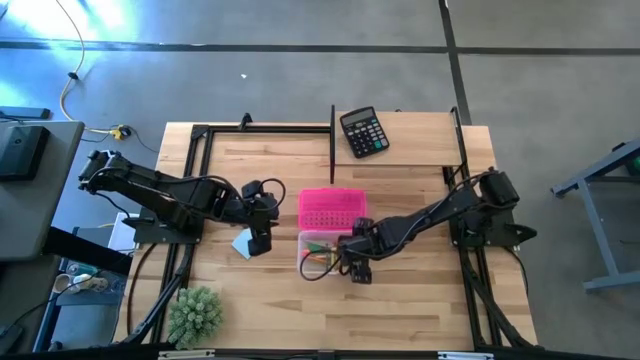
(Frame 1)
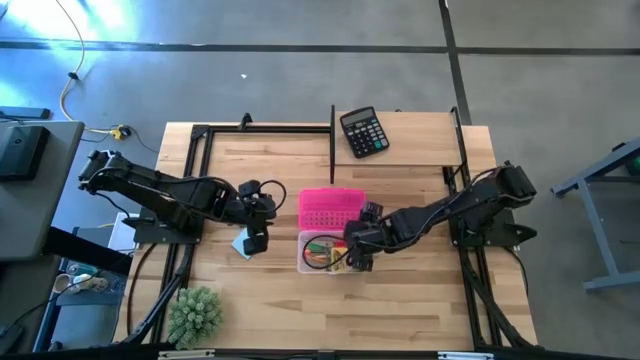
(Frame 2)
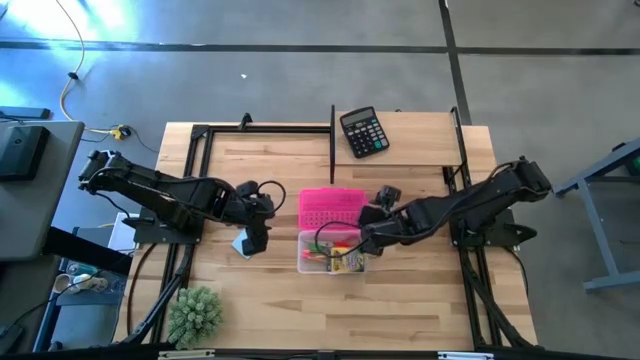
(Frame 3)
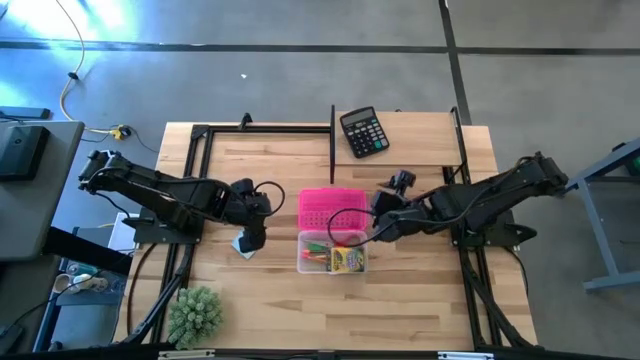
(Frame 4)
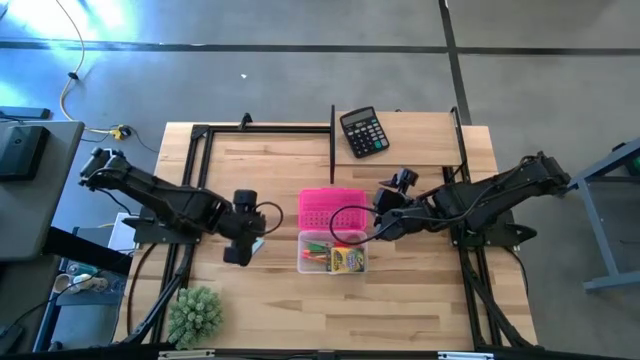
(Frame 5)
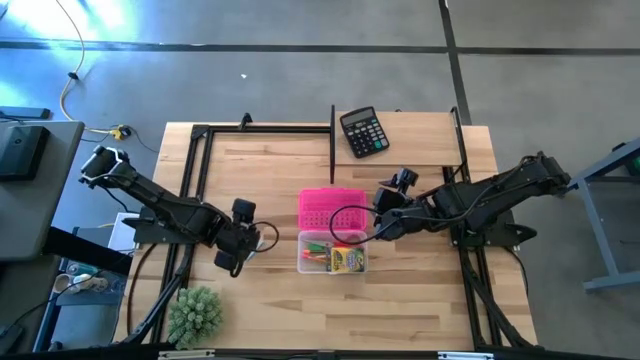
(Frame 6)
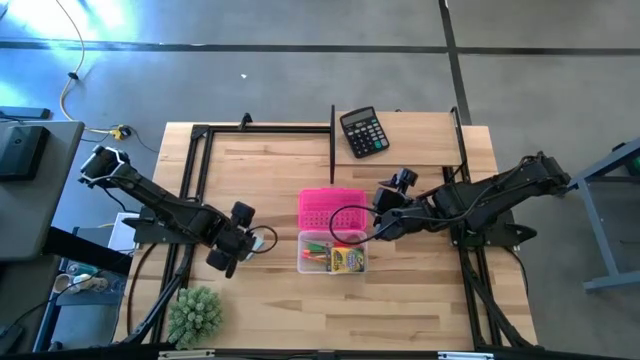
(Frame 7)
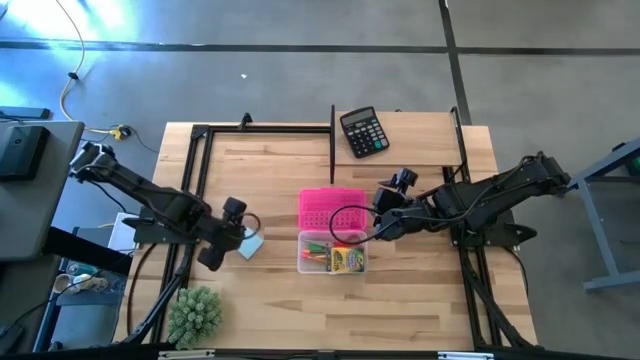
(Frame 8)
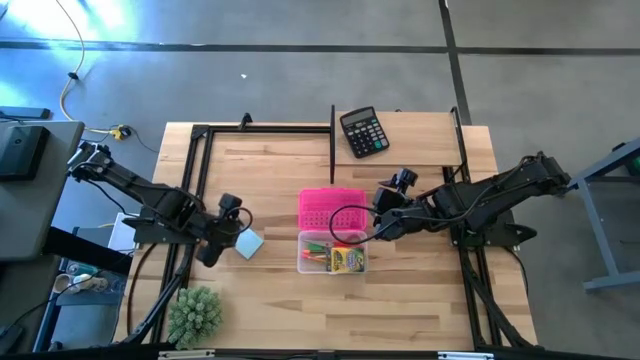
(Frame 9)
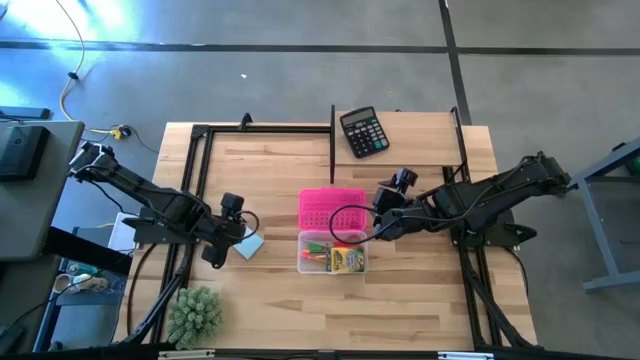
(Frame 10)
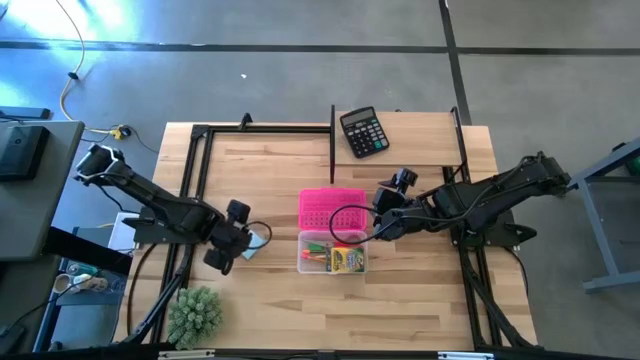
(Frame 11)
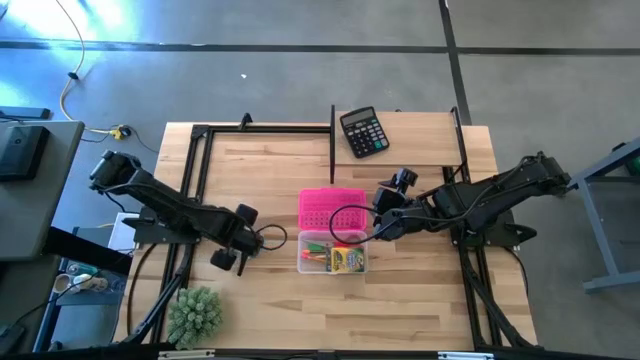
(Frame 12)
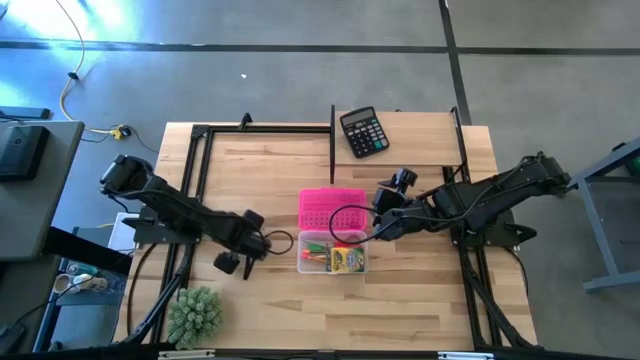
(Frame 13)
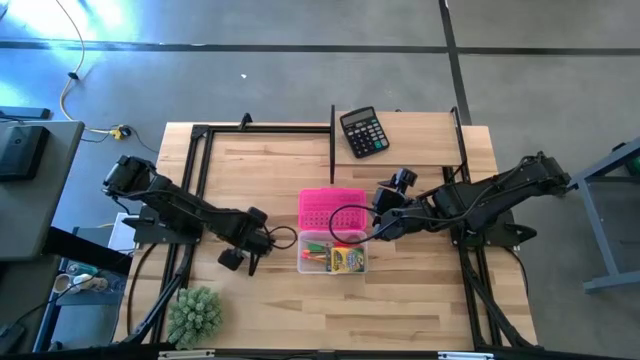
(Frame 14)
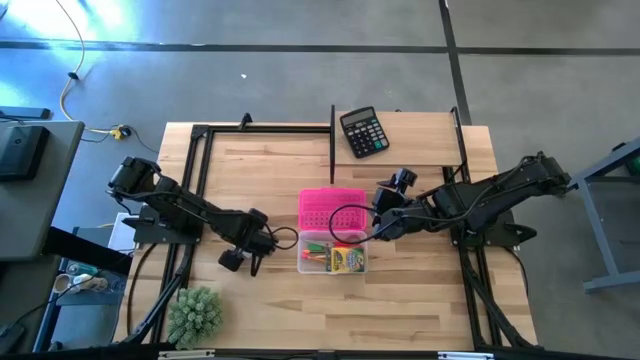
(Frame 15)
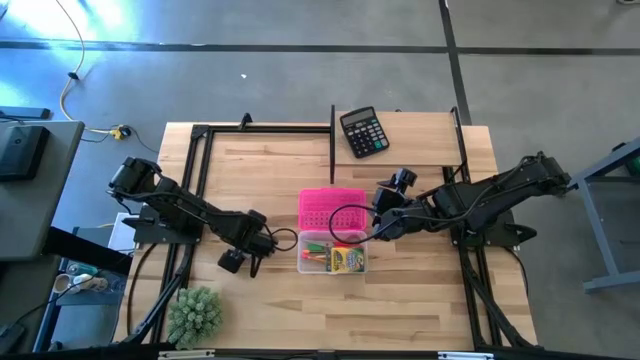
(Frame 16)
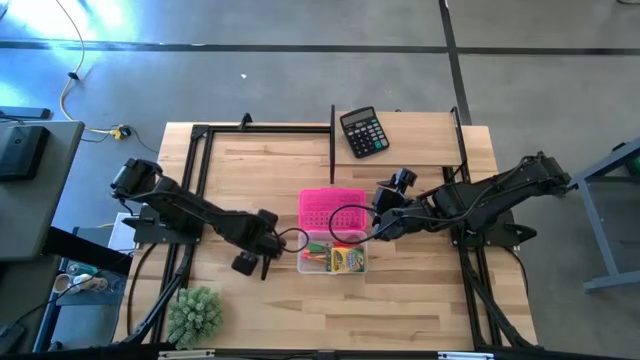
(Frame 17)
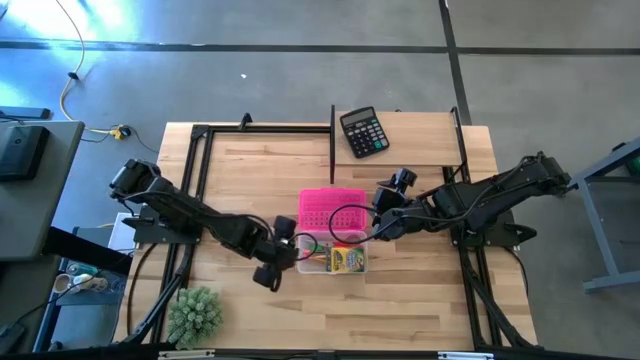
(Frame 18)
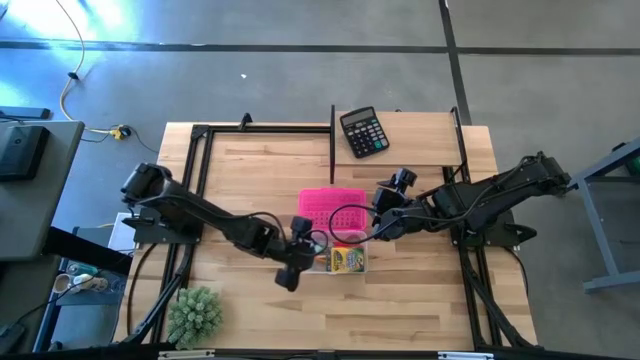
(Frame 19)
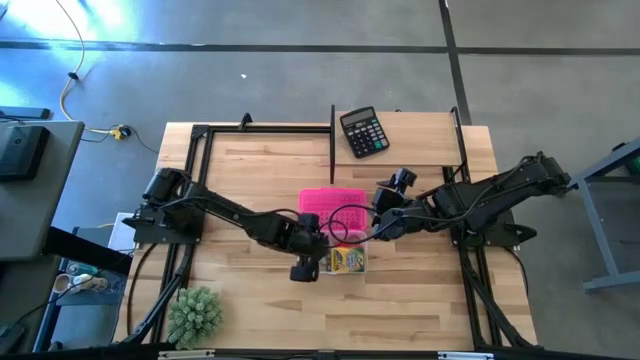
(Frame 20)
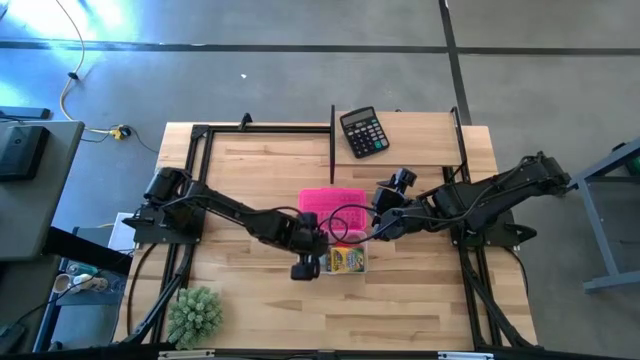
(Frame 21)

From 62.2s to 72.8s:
Task: Pack school essentials
Put the light blue sticky notes into the pink supply box

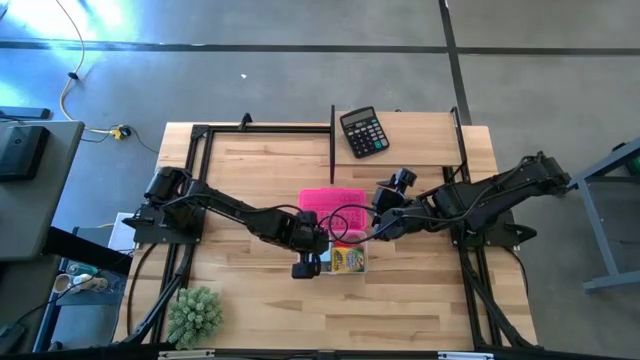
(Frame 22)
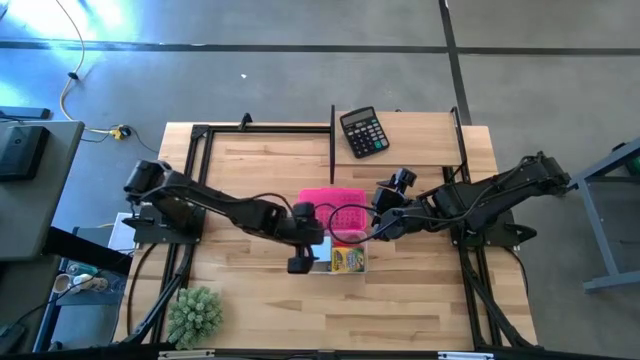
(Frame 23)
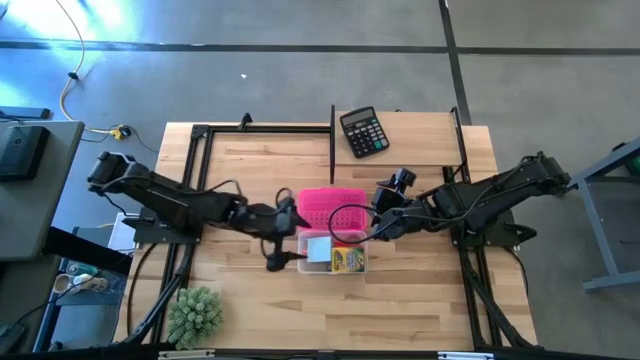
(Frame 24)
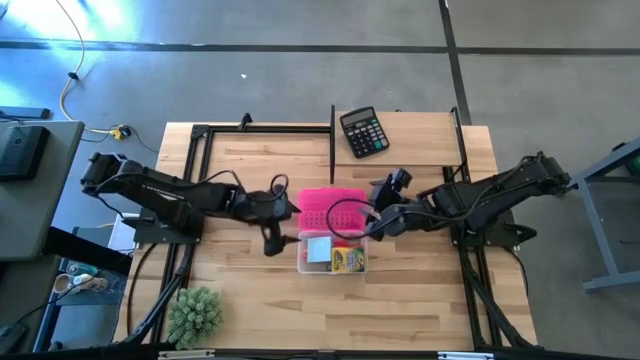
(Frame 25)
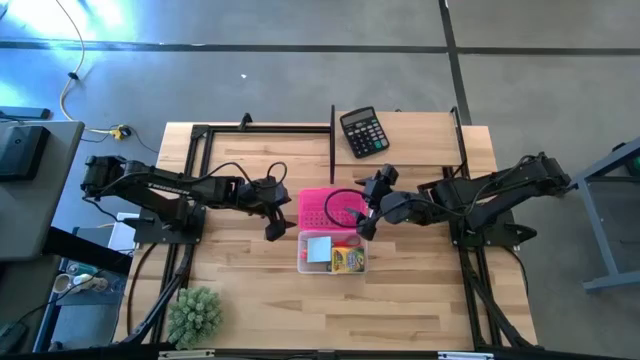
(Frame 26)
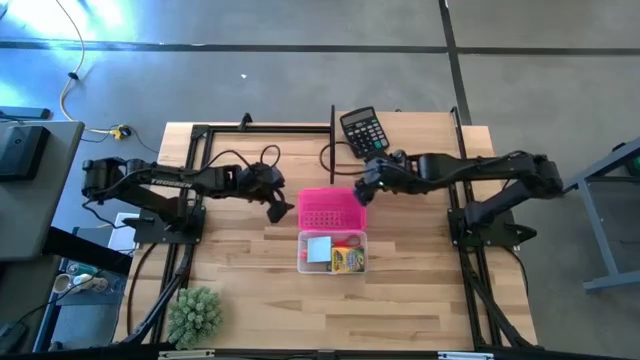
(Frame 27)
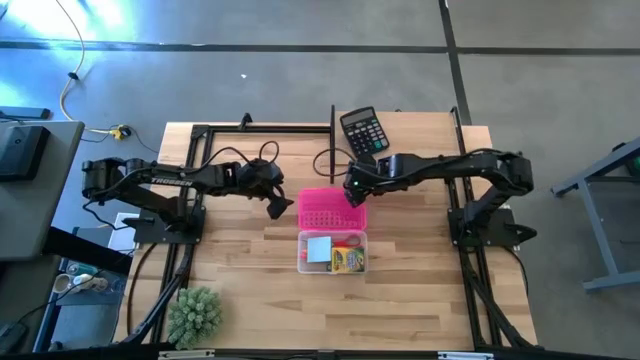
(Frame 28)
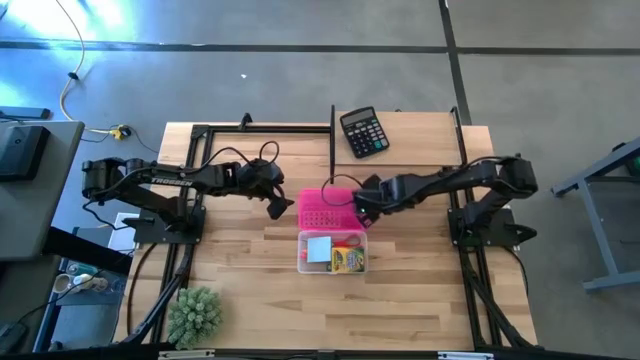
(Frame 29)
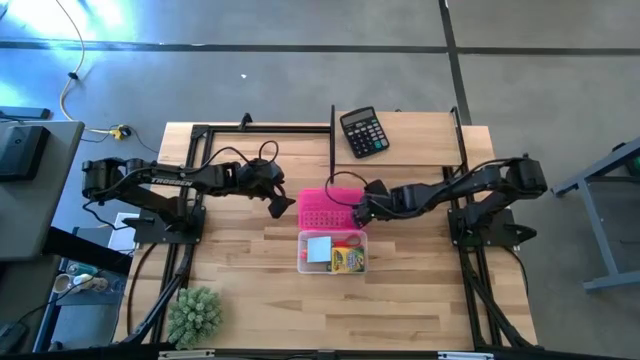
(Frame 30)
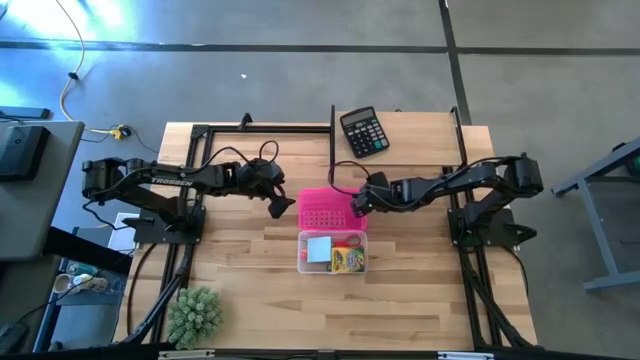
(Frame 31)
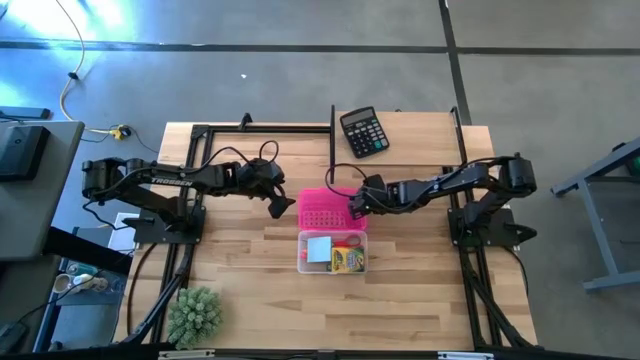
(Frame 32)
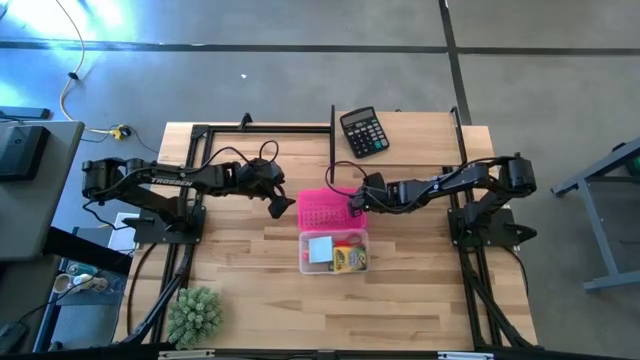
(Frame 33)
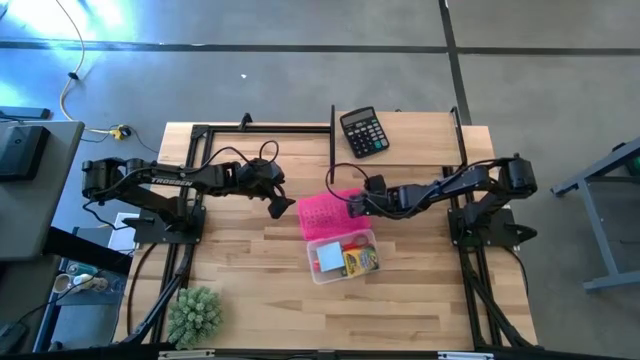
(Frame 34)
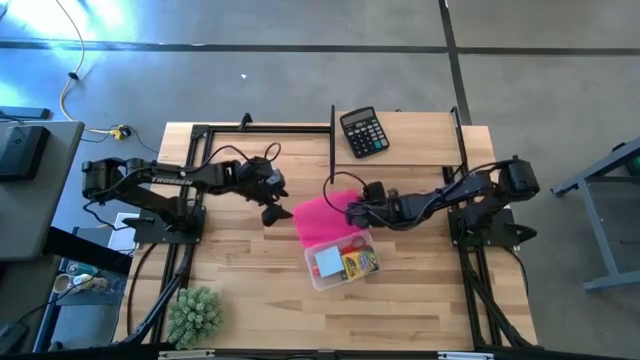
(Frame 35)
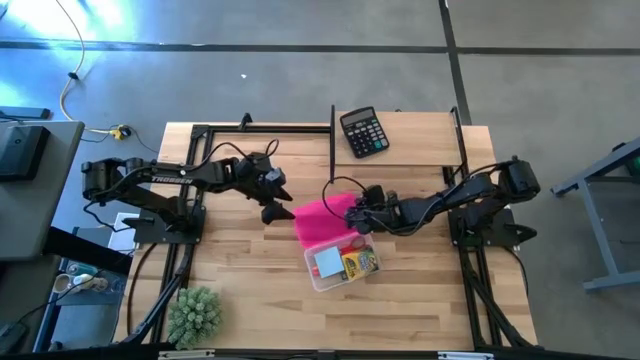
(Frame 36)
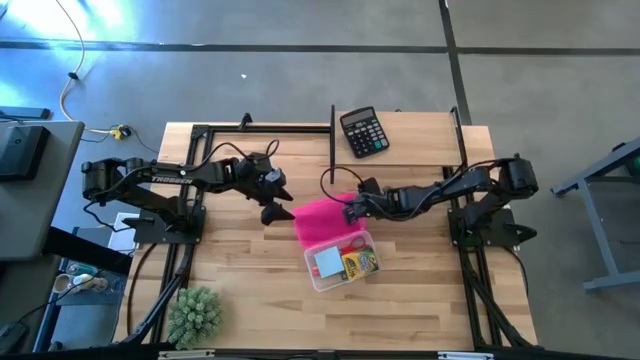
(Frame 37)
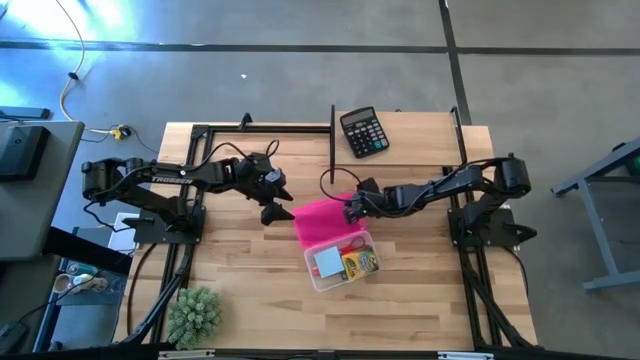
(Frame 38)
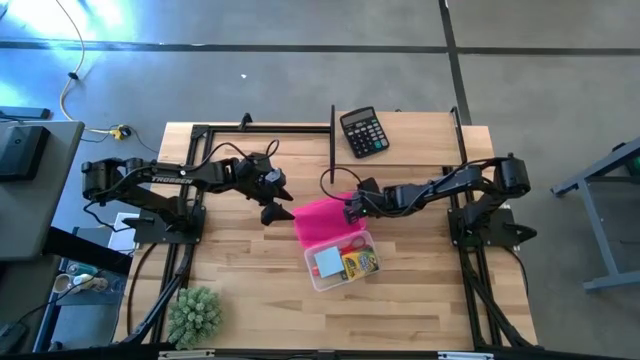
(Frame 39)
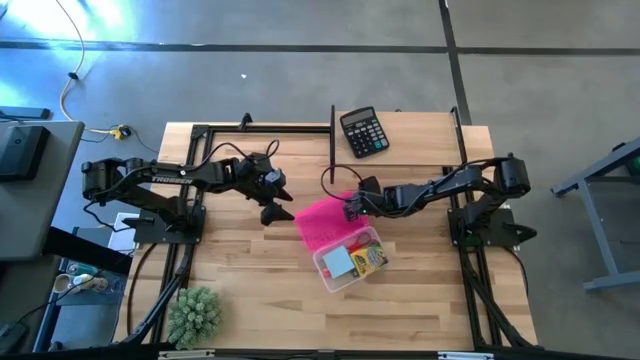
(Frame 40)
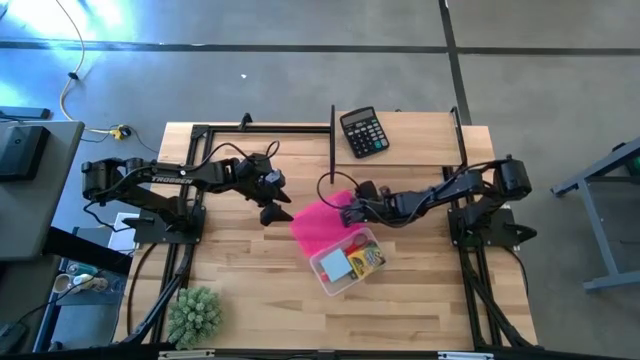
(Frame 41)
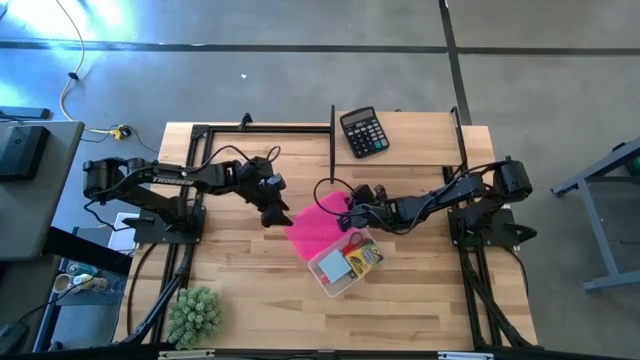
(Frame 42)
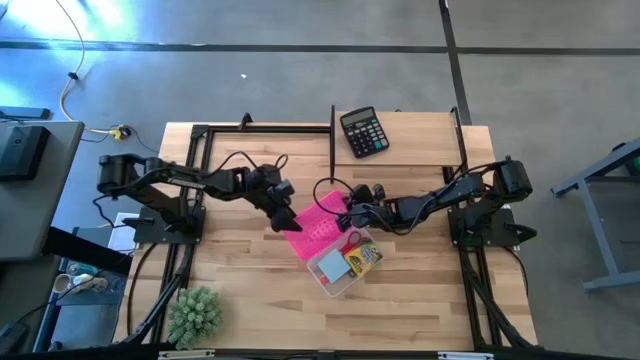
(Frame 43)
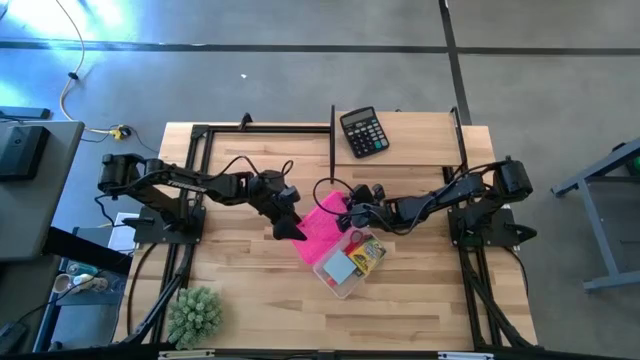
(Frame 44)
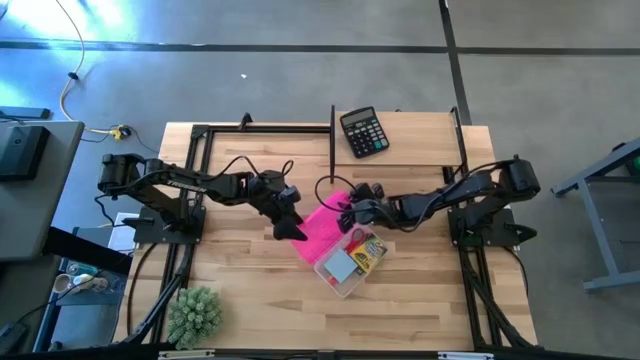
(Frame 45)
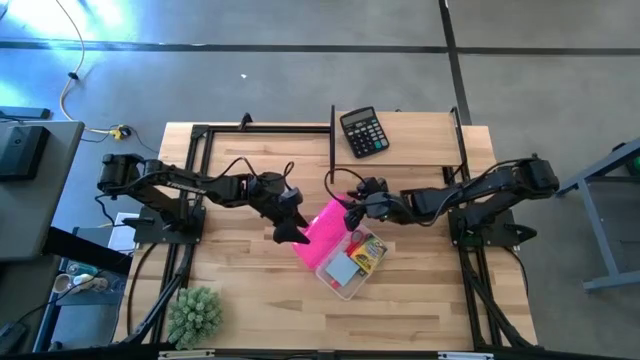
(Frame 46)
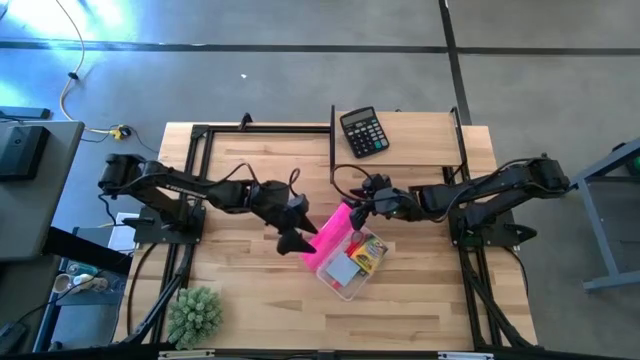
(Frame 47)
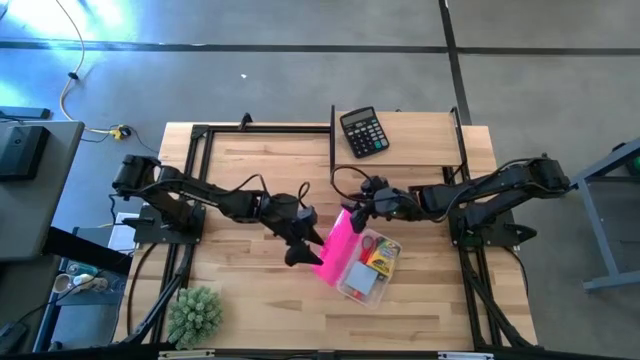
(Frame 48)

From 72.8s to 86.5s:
Close the pink supply box
